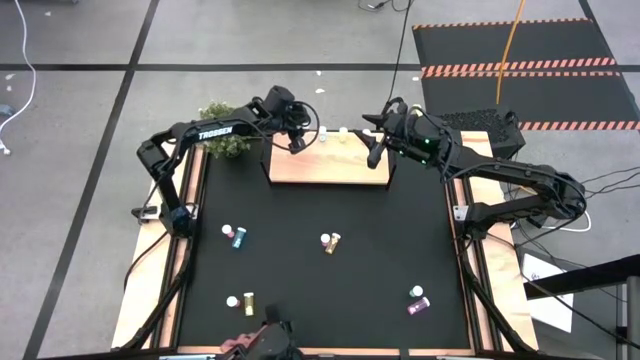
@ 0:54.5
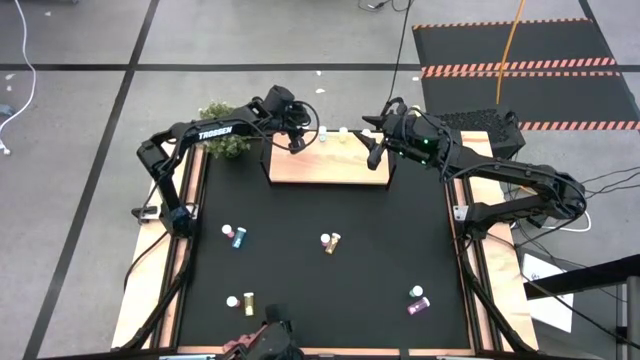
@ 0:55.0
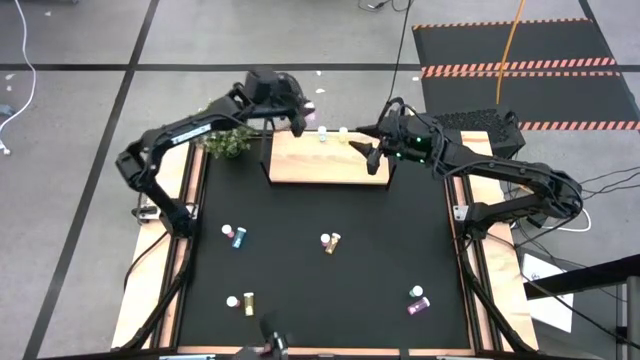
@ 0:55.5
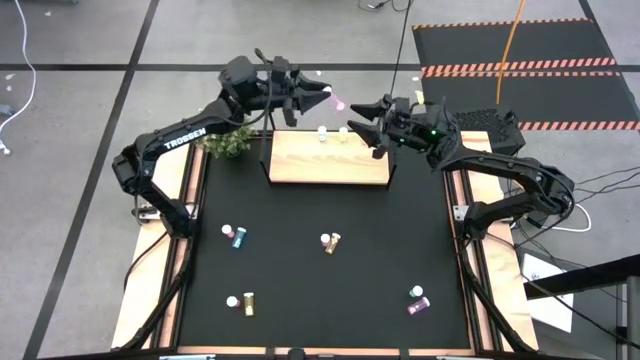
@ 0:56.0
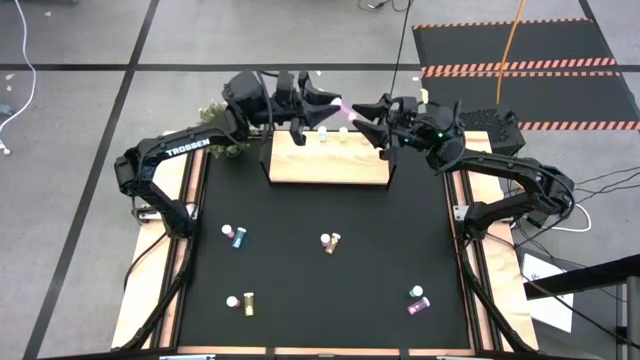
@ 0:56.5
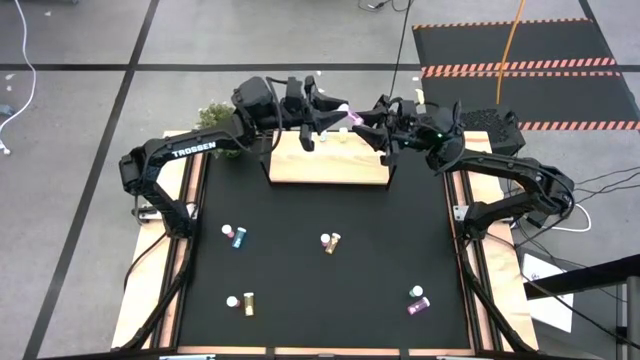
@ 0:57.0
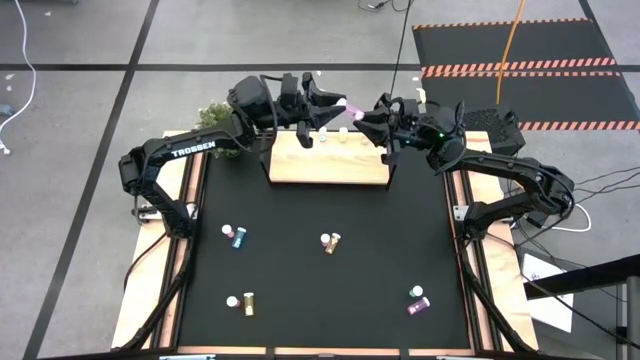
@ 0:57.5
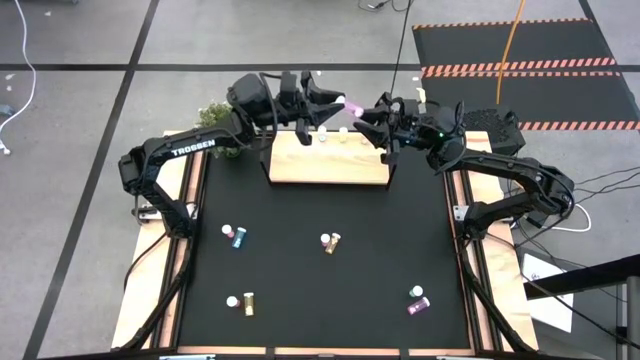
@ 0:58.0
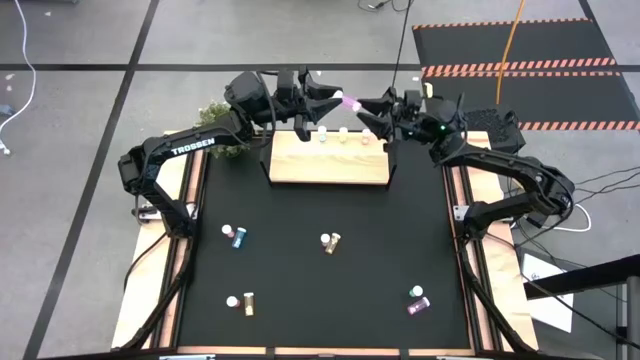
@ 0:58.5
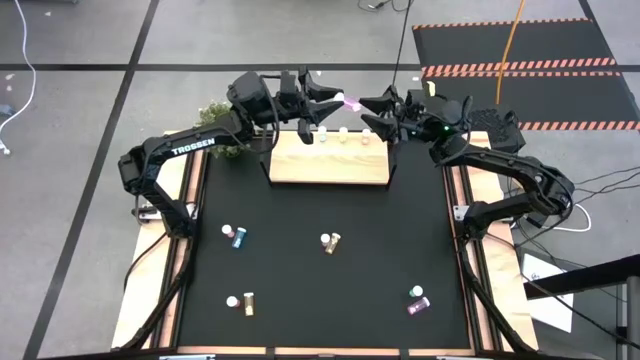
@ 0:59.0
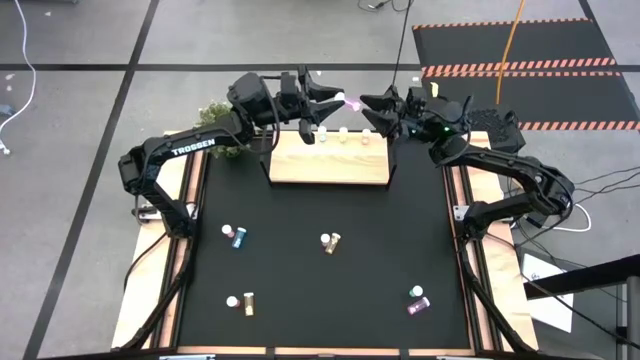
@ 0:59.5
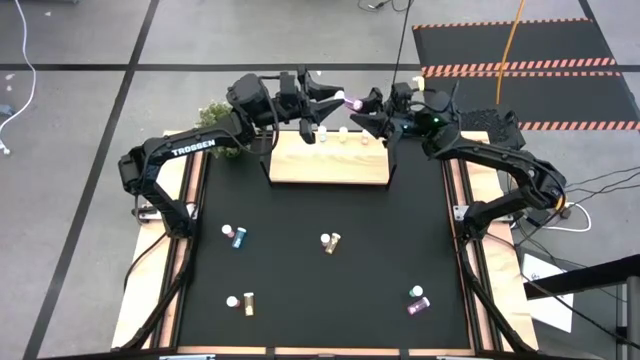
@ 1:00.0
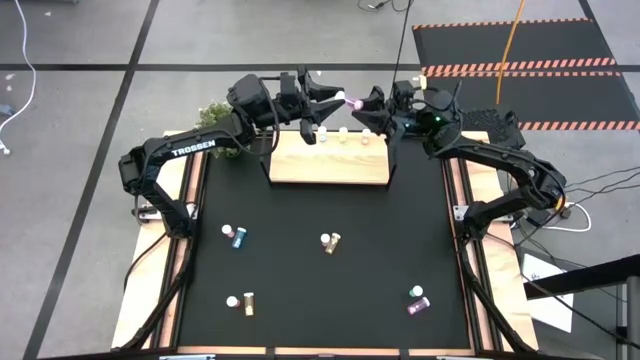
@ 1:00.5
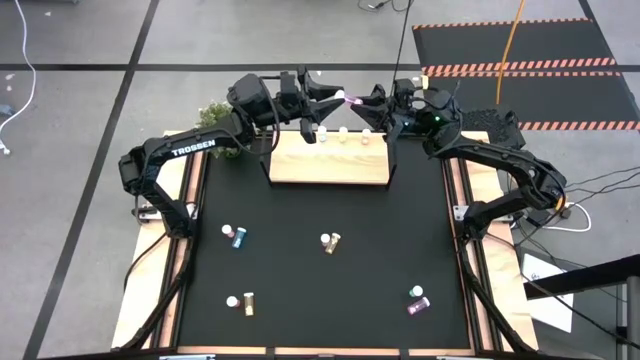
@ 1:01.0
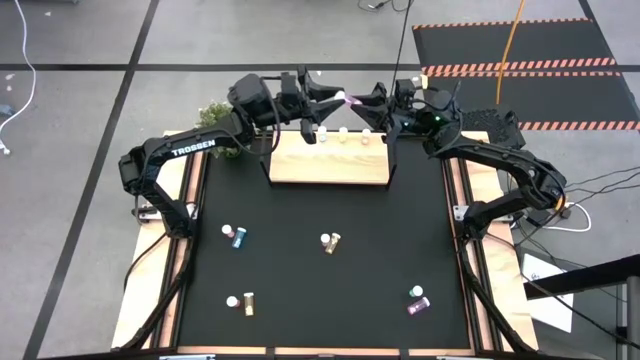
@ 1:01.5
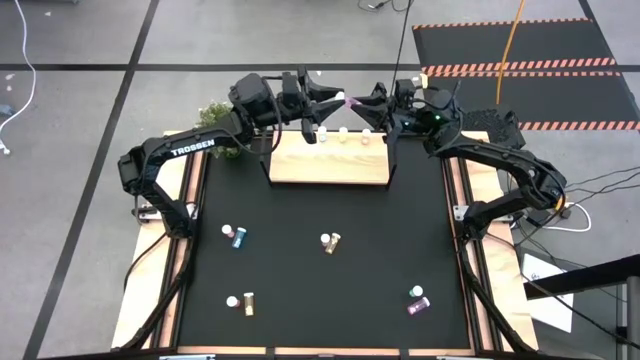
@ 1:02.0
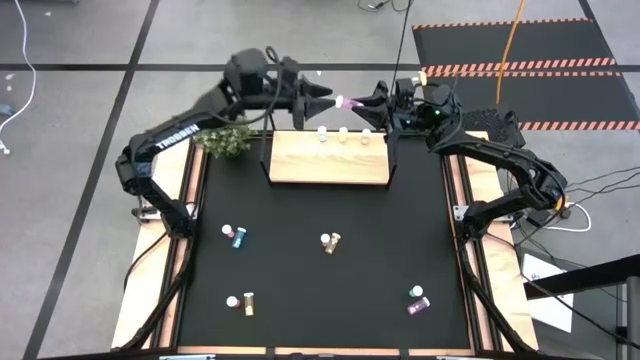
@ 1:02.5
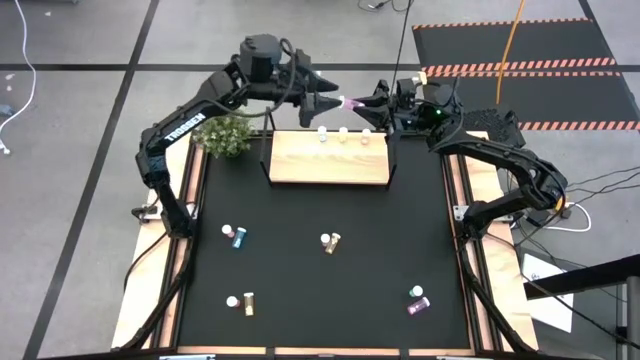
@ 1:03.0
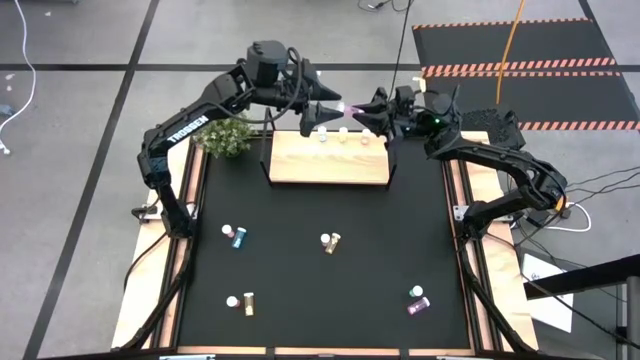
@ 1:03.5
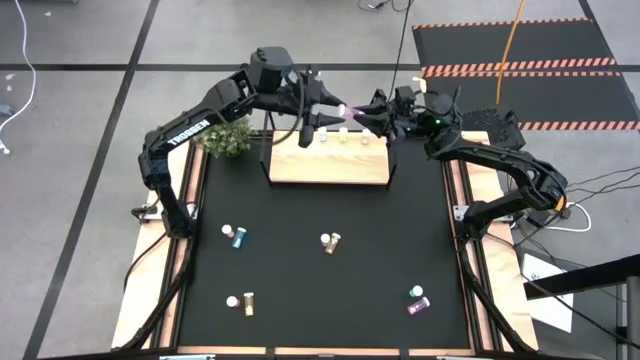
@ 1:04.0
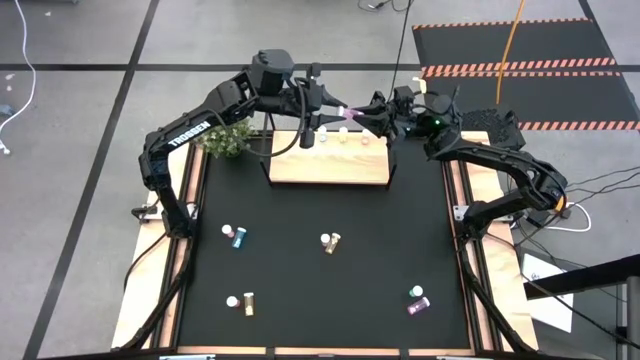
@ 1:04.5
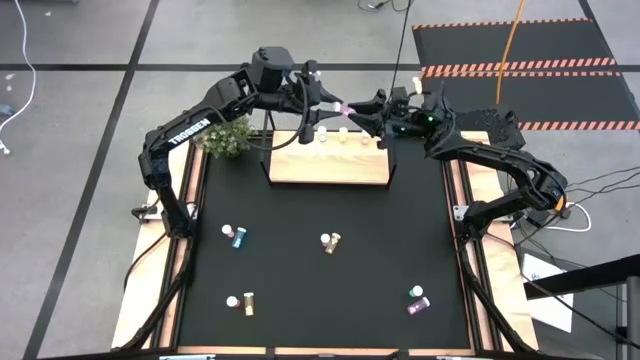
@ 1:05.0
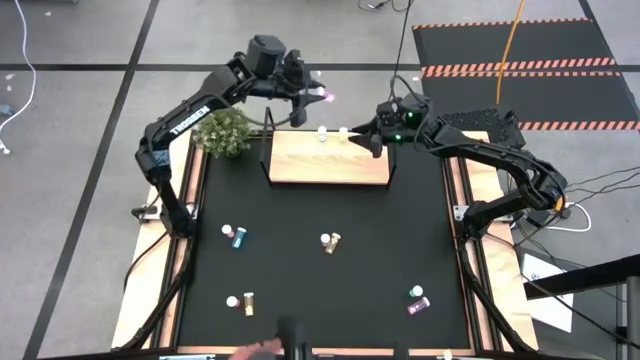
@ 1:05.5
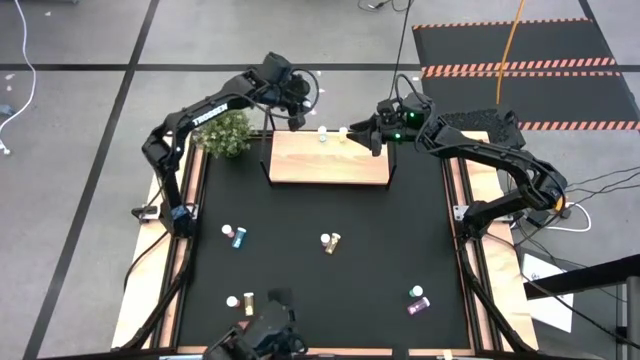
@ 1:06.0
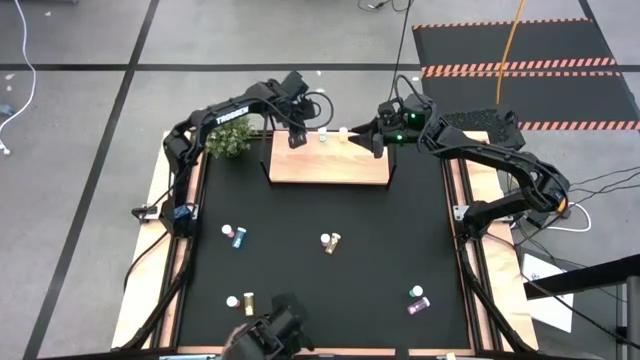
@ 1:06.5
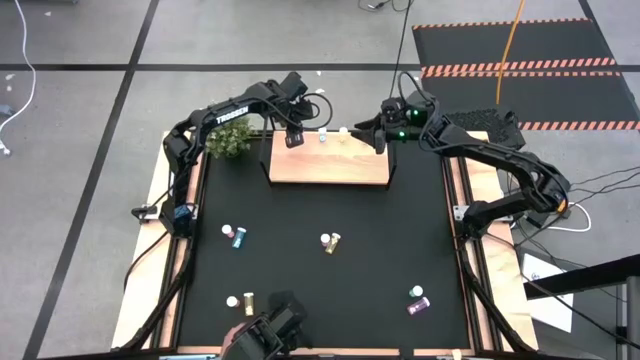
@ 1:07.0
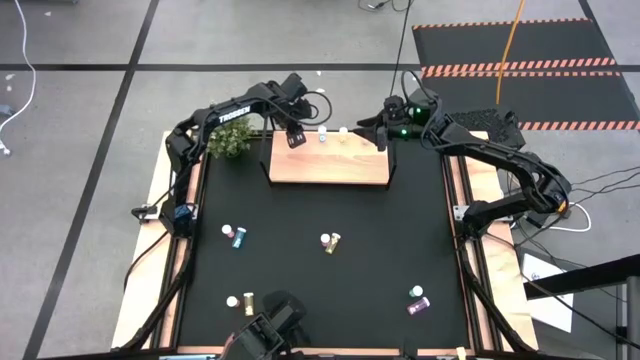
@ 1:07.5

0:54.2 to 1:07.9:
Task: Pick and place medicine bottles onto shelf by color
Put the top right purple pill bottle on the shelf

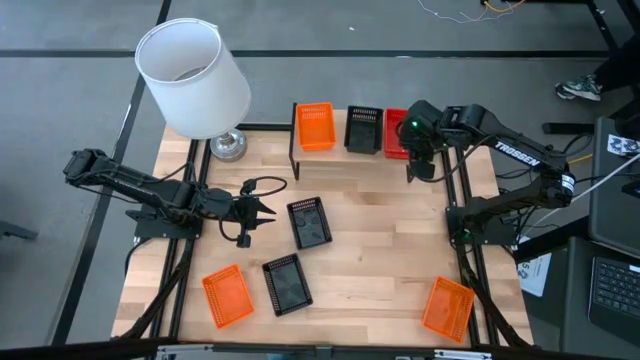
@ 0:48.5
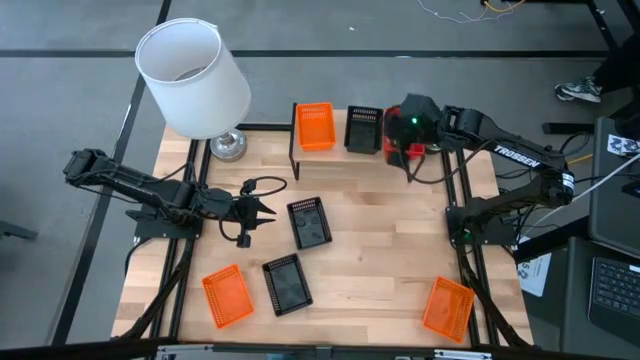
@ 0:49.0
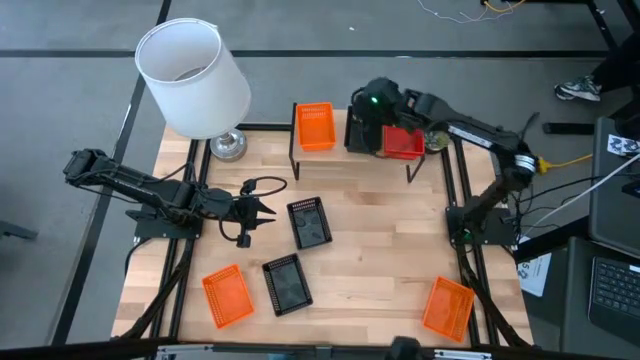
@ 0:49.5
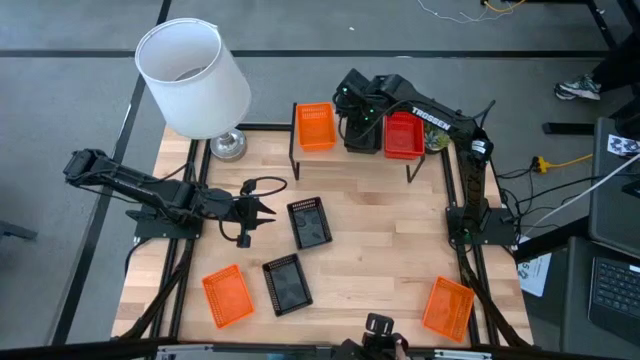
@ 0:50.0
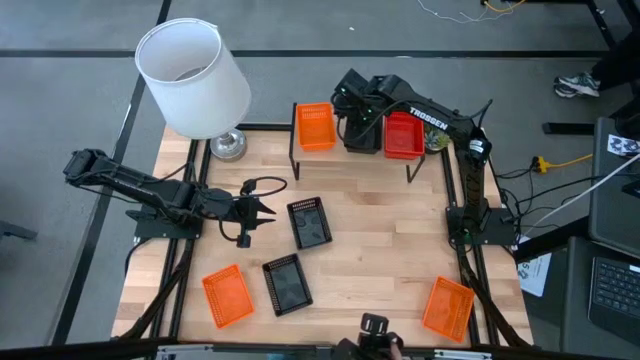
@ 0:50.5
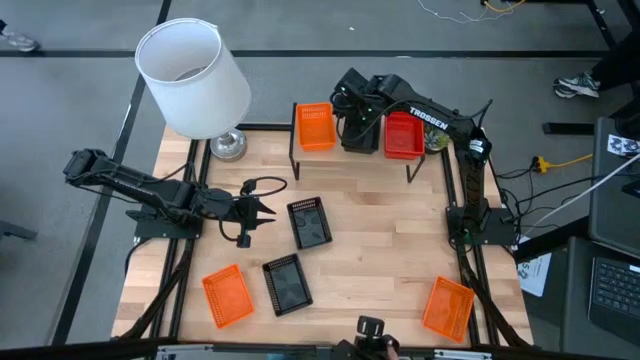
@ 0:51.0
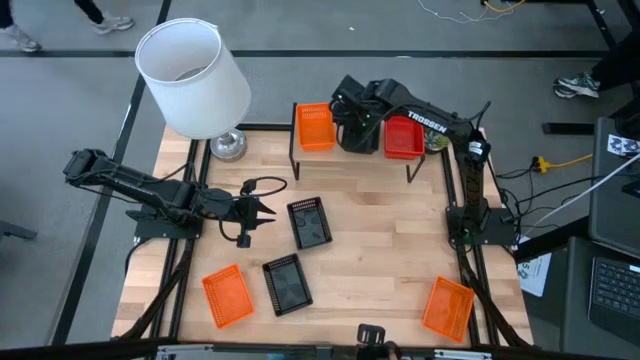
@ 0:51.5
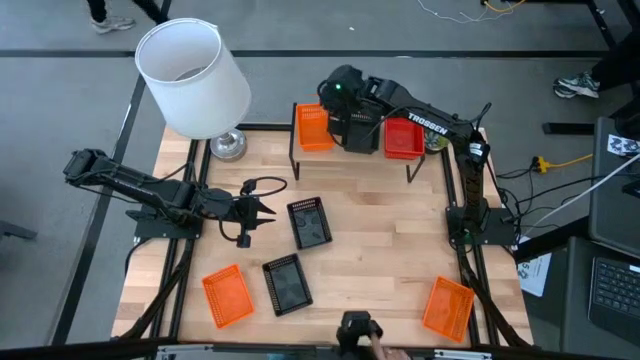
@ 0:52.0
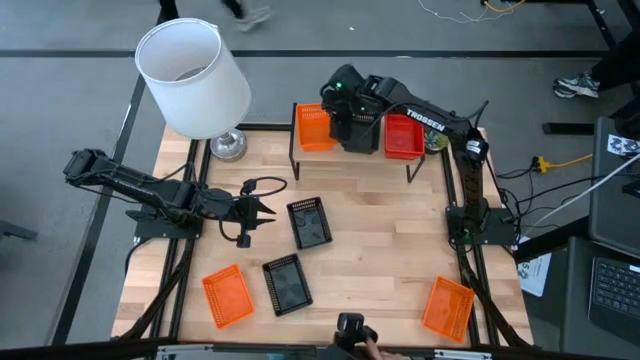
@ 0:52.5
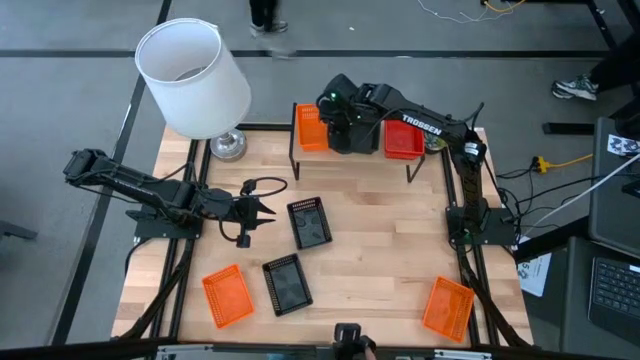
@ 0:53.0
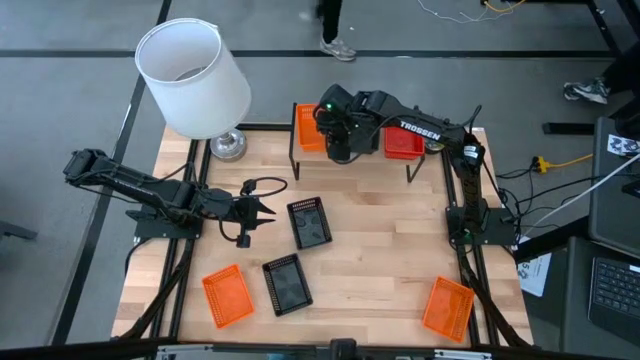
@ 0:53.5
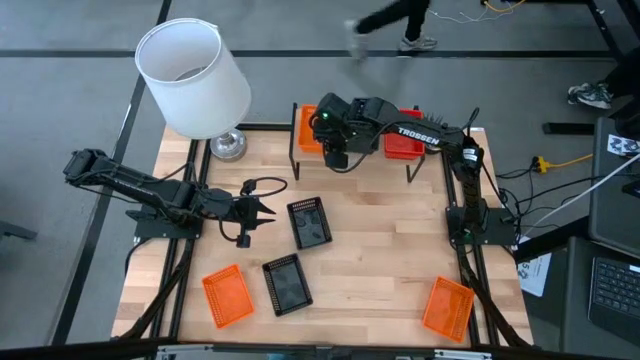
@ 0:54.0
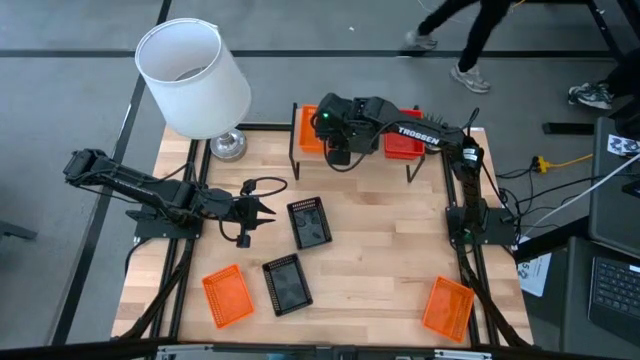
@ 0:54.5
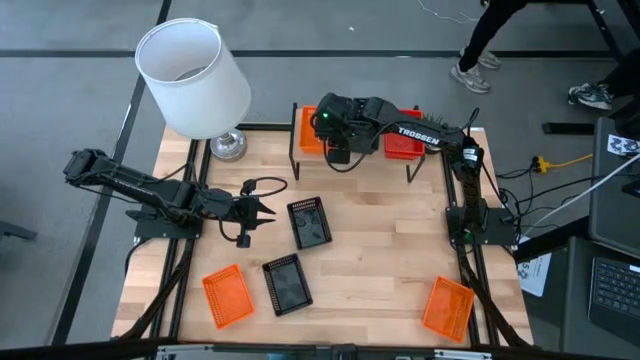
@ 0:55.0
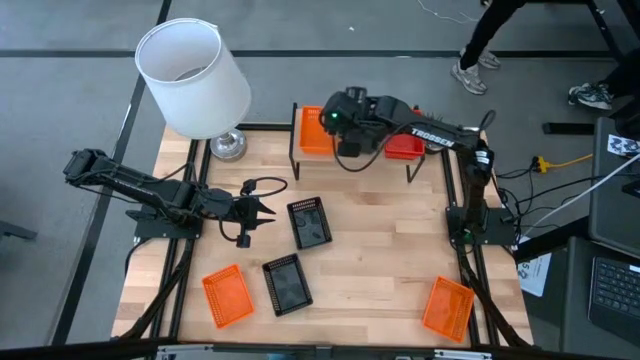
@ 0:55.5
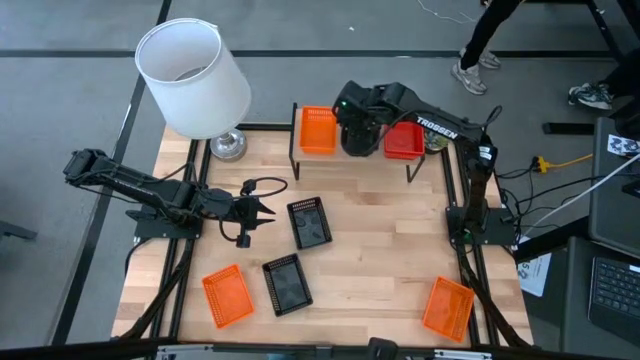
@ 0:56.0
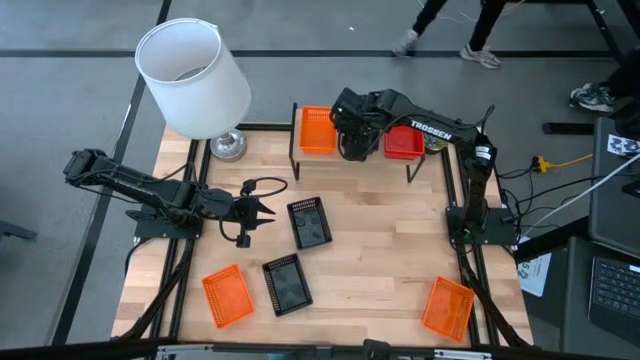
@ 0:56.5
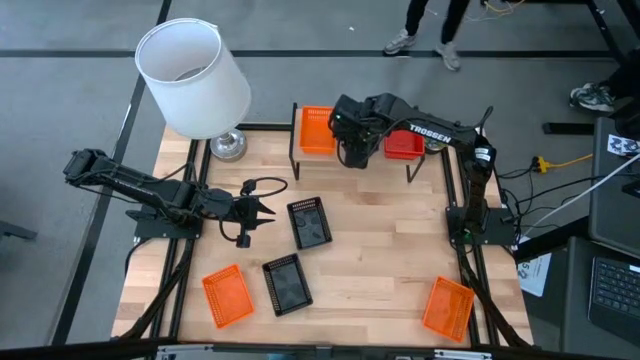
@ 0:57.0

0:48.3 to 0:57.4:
Task: Stack baskets on shelf by color
Adjust the orange and black basket on the shelf
